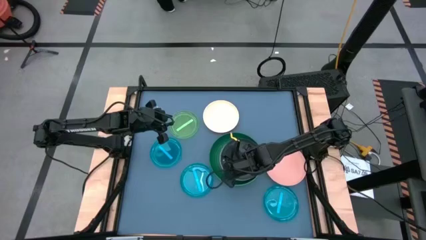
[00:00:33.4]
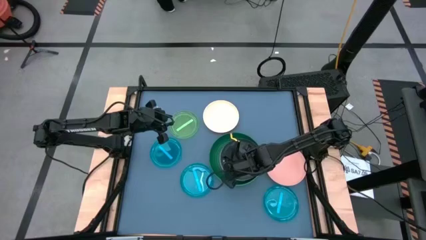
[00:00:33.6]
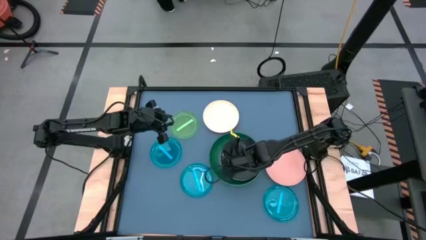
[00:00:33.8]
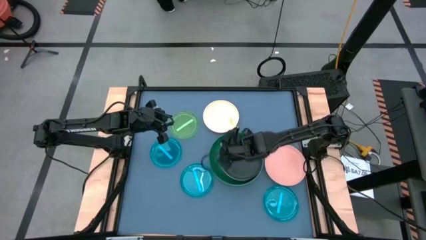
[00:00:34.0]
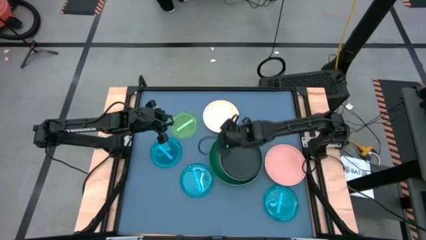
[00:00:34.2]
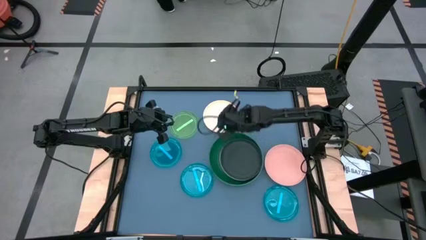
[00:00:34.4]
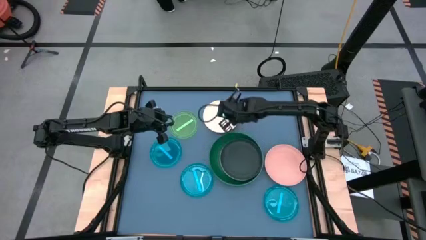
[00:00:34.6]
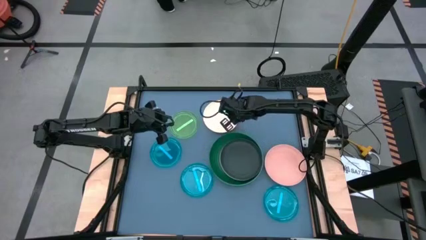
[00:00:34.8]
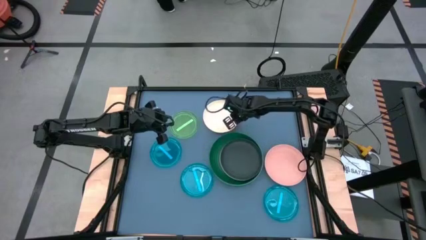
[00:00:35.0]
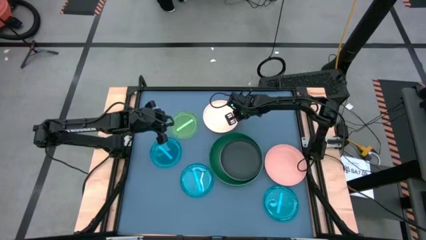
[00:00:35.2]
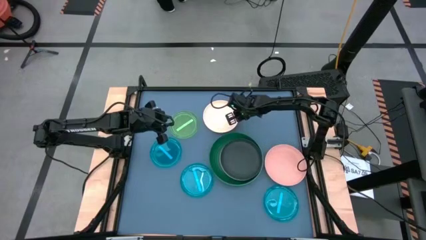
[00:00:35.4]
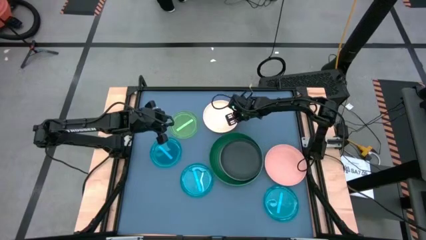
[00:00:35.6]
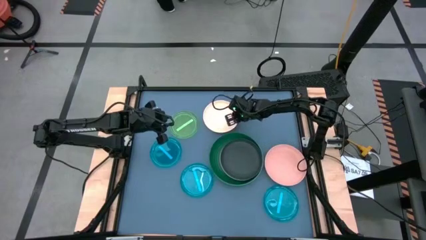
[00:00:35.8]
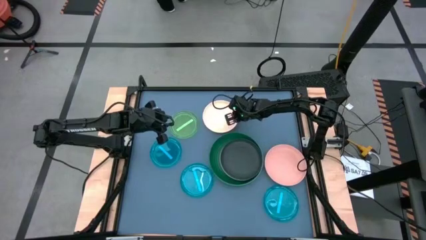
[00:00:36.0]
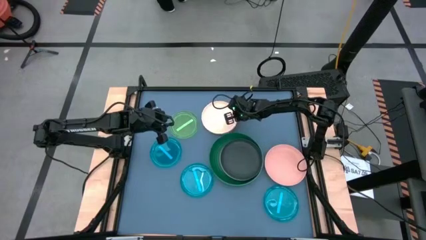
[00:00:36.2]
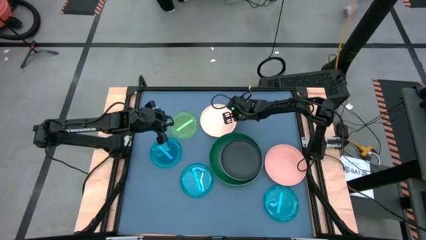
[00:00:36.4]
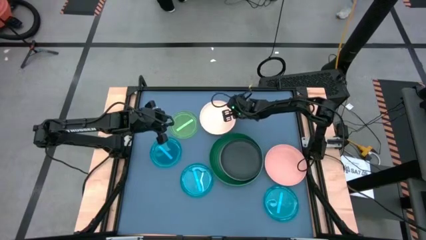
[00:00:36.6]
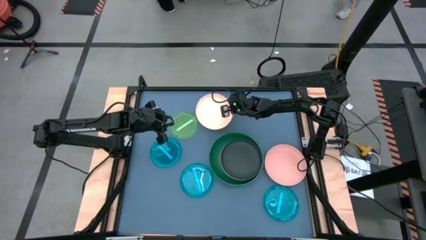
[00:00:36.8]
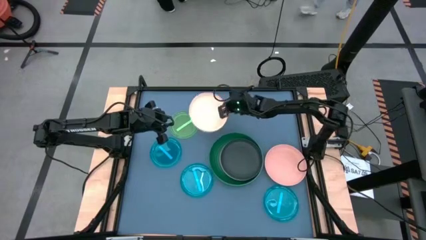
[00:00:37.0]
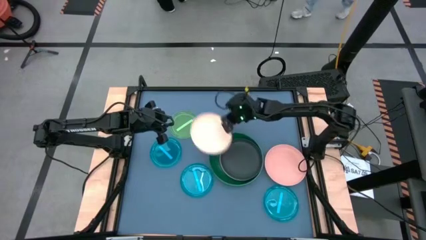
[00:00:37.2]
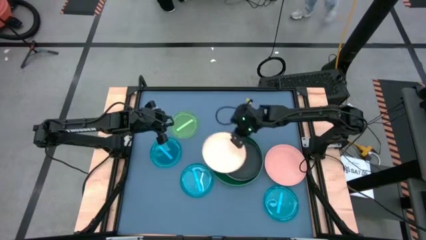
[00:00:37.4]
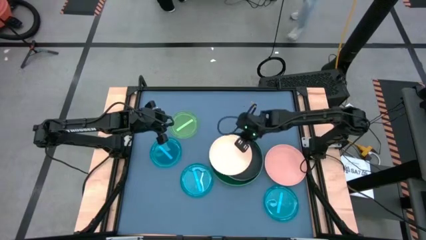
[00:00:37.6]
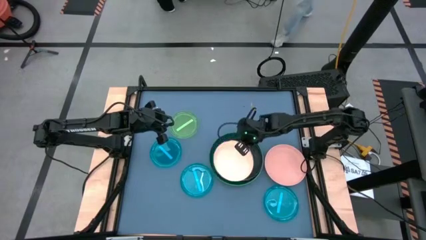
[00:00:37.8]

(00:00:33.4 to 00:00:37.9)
Task: Stack plastic plates
Stack the white plate on top of the black plate

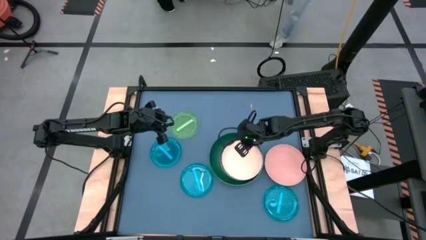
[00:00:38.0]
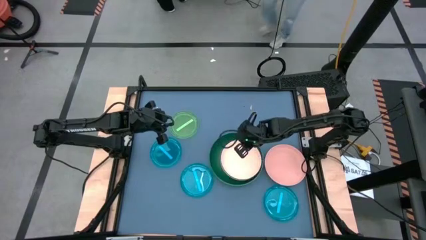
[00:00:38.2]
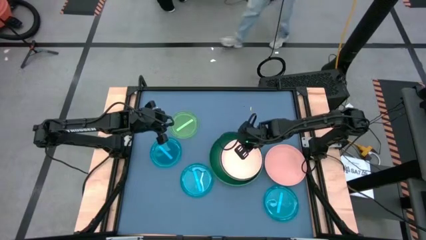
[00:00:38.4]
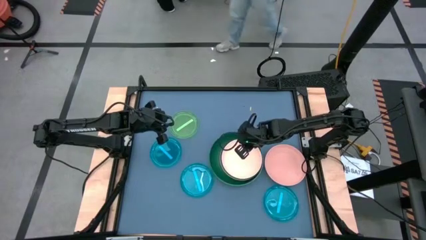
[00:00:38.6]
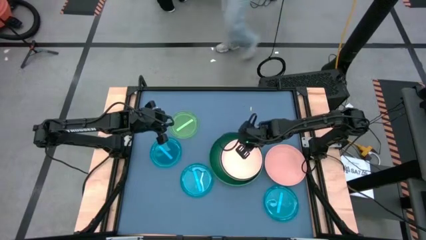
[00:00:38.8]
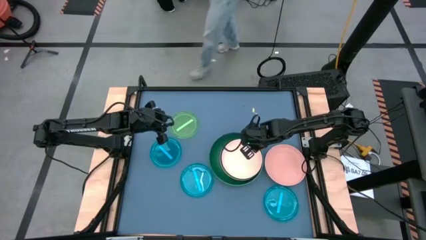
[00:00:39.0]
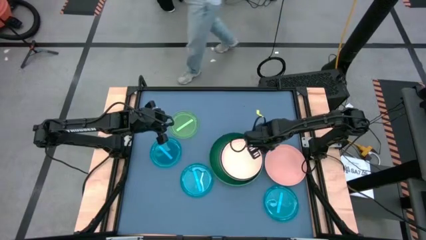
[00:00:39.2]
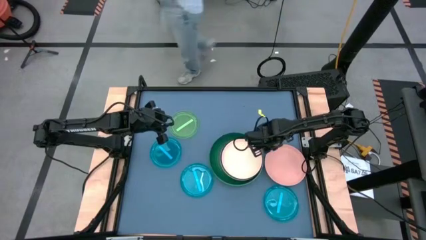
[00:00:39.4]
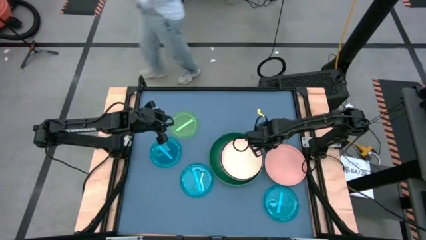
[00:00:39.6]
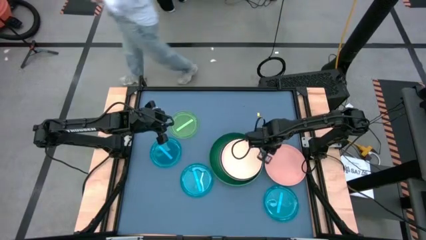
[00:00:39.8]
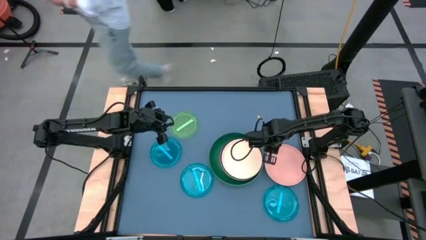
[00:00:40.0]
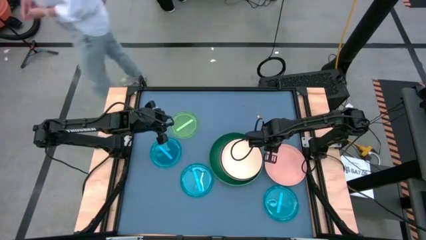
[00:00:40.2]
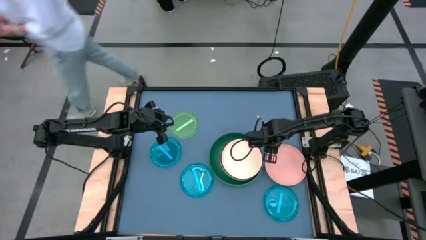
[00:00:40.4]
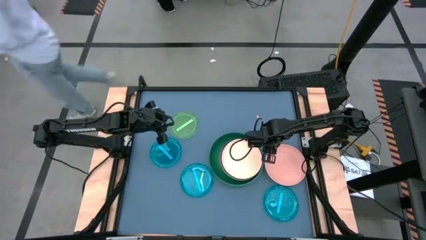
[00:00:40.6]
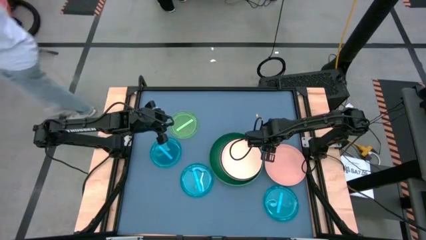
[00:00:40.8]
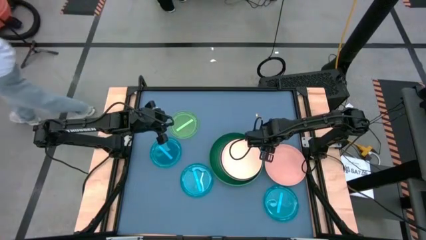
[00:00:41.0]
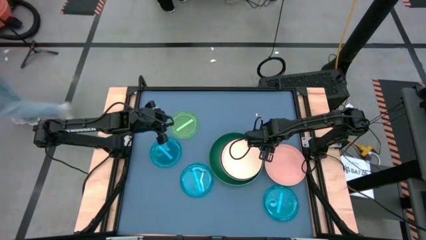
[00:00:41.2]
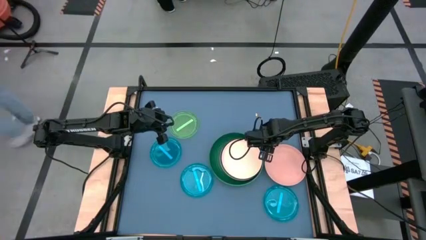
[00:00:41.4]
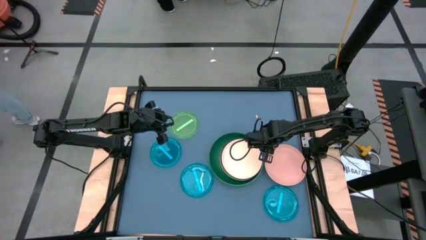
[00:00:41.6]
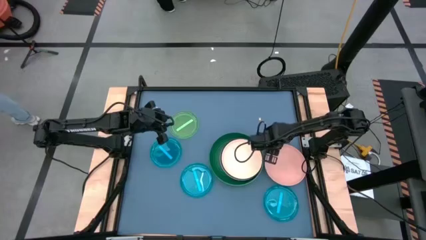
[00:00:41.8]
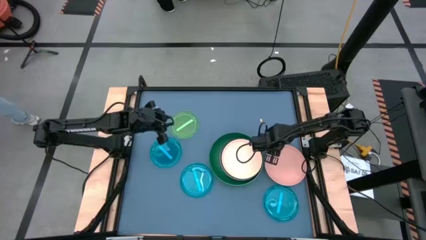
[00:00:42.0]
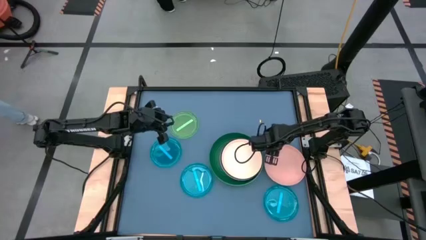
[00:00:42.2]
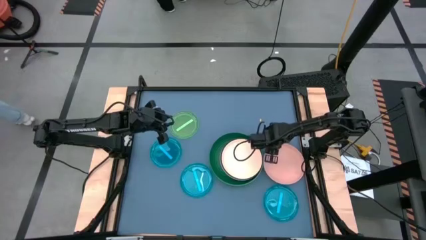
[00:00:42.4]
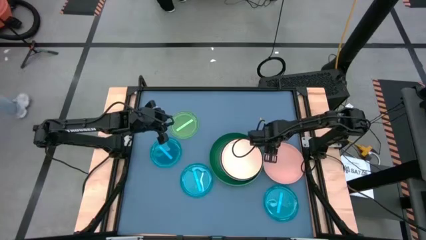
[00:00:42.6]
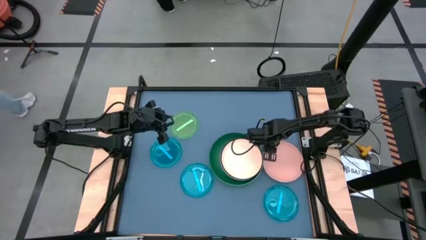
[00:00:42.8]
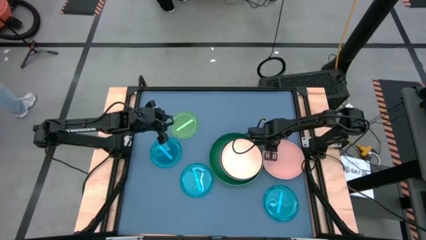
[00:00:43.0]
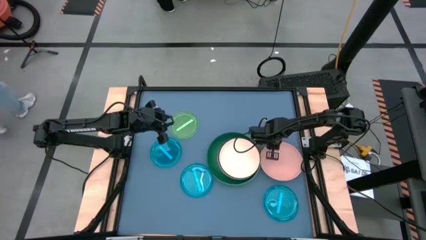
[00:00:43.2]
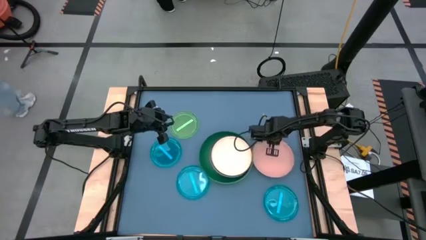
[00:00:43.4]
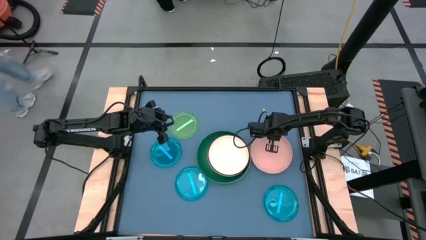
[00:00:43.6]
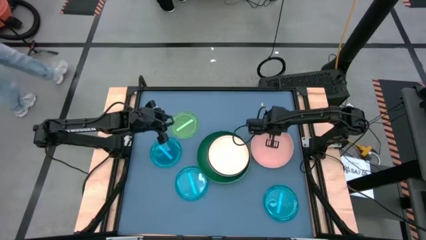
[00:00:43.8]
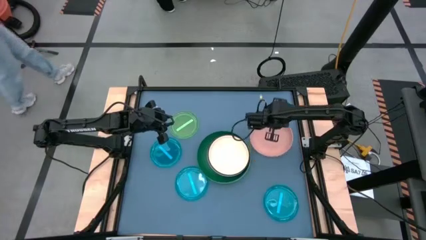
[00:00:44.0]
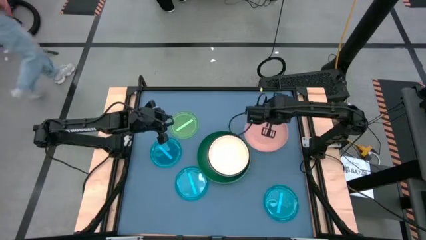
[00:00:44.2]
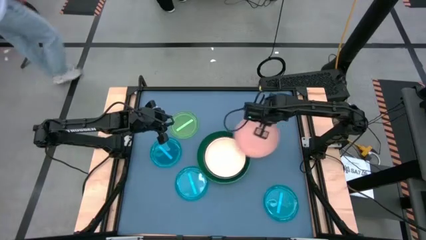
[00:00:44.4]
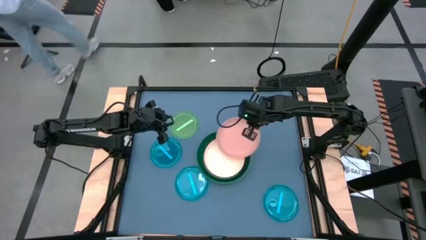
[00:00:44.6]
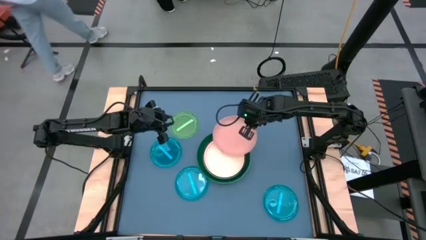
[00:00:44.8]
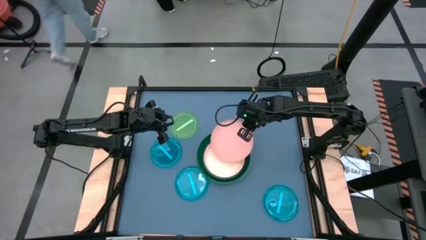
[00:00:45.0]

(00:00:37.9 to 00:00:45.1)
Stack the pink plate on top of the white plate

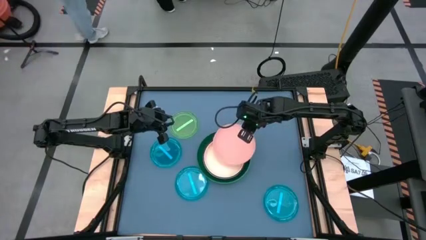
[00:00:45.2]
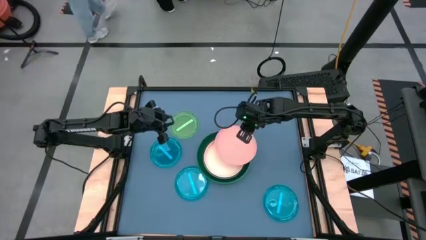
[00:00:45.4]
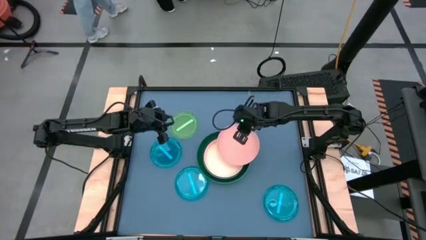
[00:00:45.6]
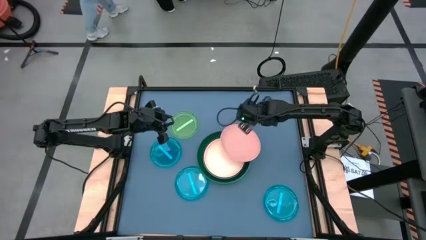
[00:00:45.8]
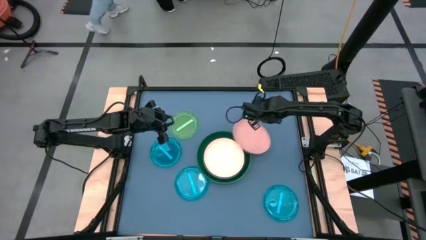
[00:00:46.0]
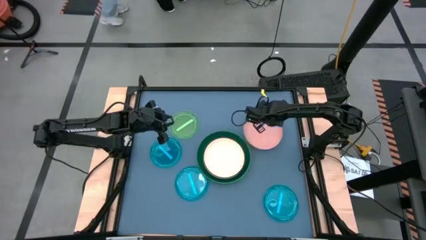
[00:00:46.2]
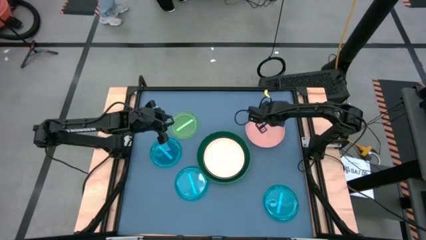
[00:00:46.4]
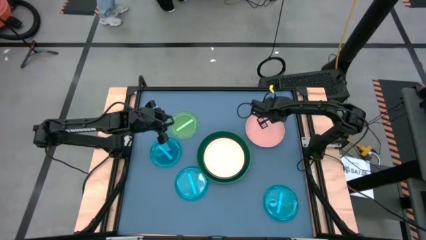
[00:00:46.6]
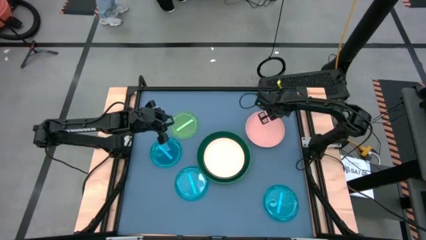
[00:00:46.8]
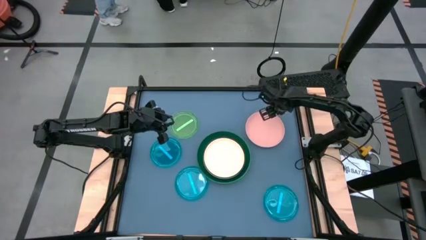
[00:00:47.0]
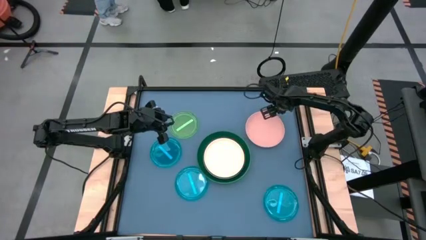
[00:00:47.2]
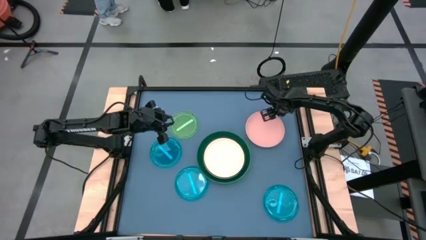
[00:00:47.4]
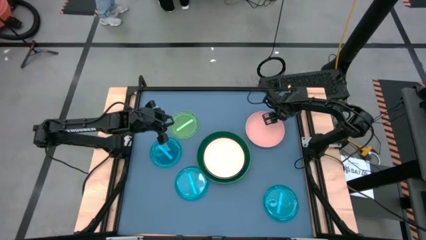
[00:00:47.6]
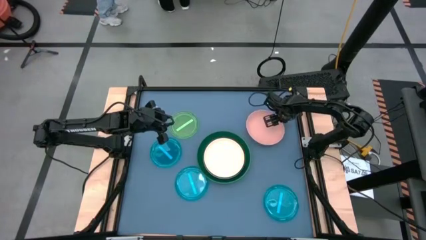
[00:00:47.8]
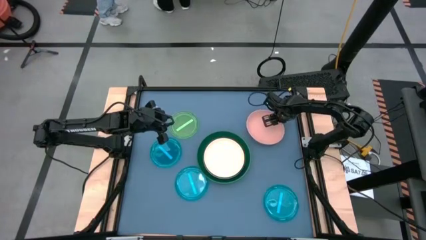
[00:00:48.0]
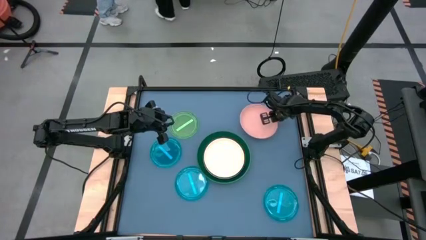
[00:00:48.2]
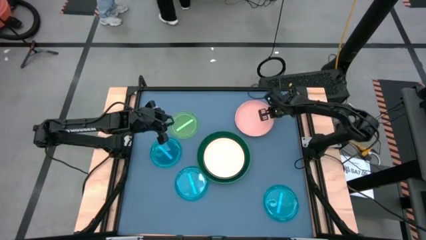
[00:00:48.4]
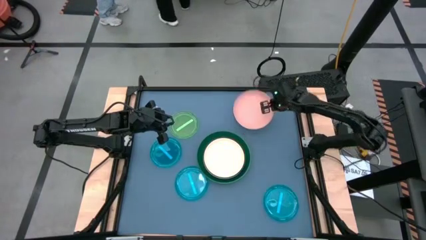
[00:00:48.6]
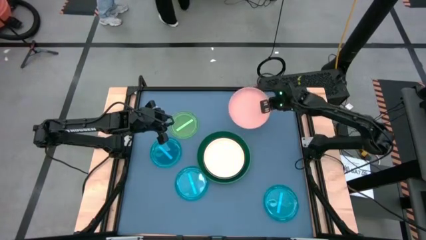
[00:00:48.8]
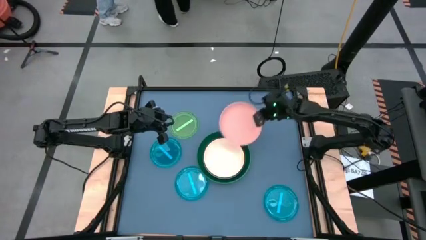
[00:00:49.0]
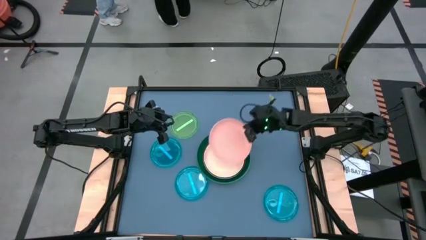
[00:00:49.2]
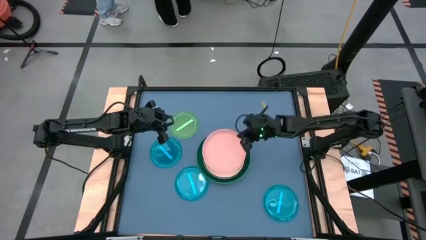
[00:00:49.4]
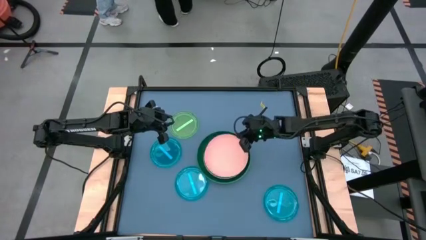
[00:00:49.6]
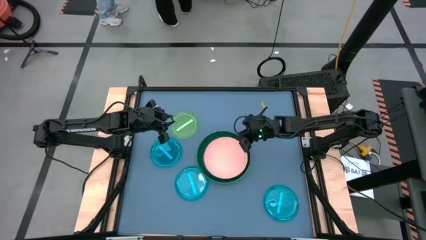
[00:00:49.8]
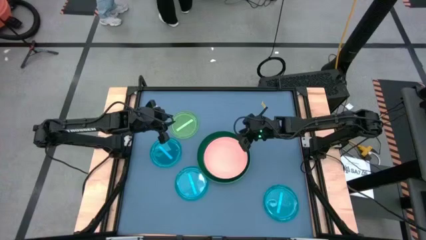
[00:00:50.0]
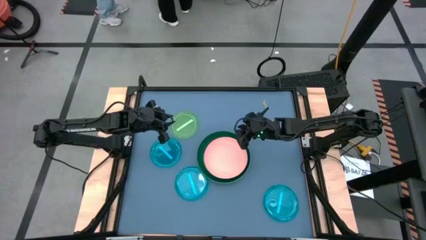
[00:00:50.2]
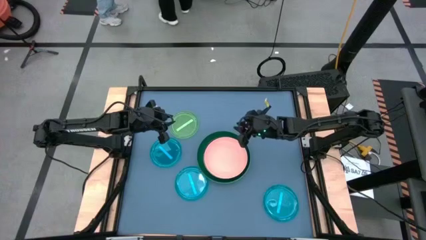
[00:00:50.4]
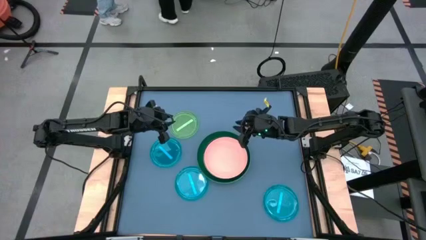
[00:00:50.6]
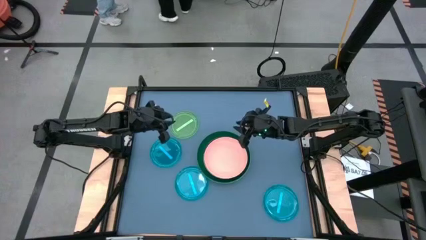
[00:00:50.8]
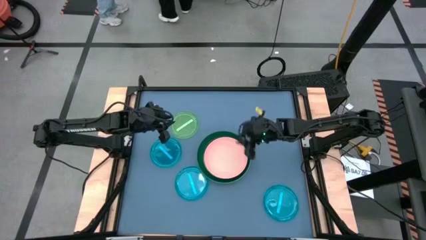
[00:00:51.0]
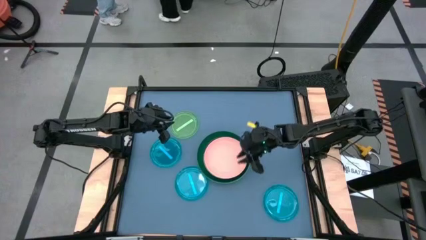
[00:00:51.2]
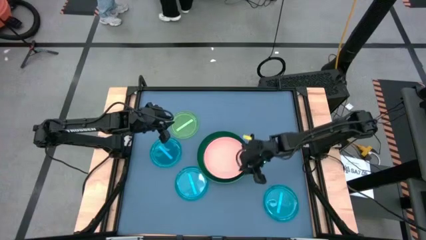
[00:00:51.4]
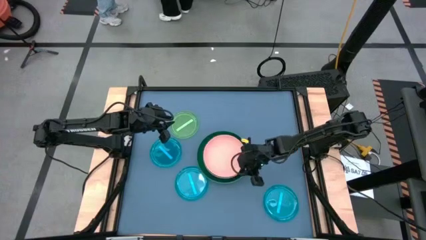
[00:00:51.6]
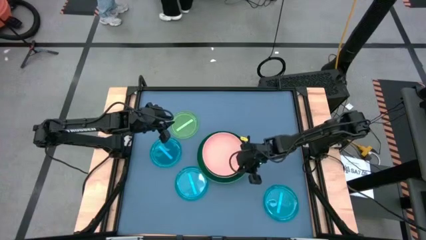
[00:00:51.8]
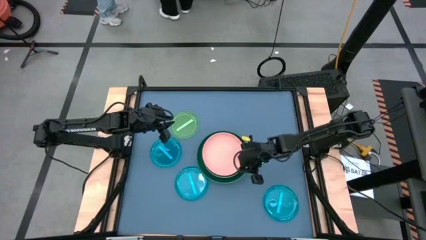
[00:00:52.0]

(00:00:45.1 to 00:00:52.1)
Stack the pink plate on top of the white plate
